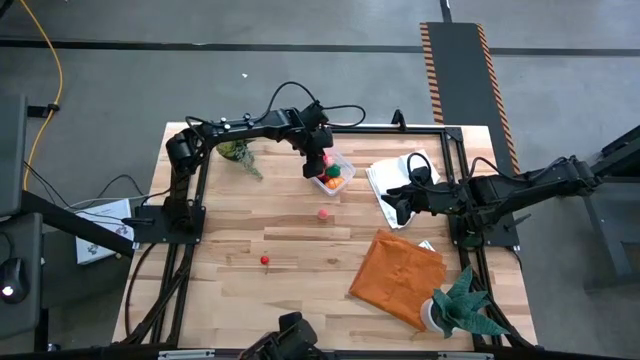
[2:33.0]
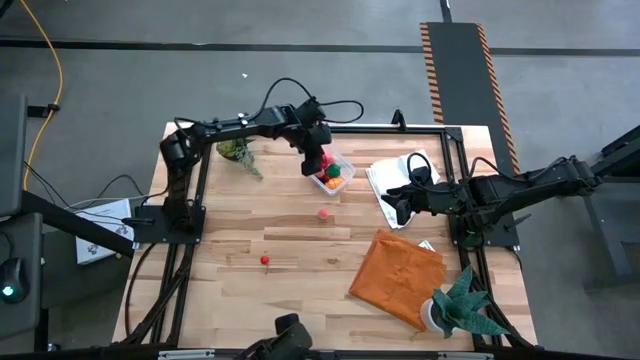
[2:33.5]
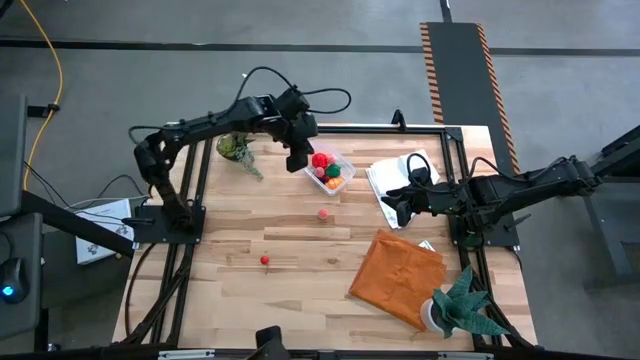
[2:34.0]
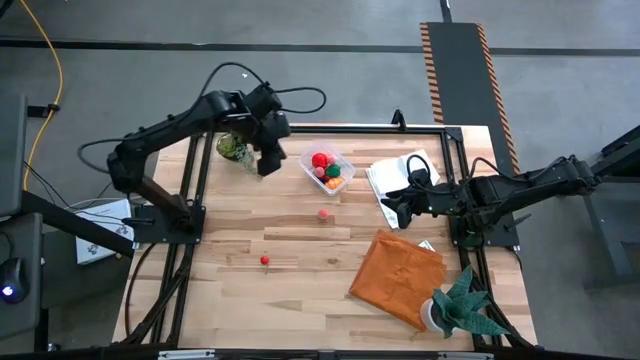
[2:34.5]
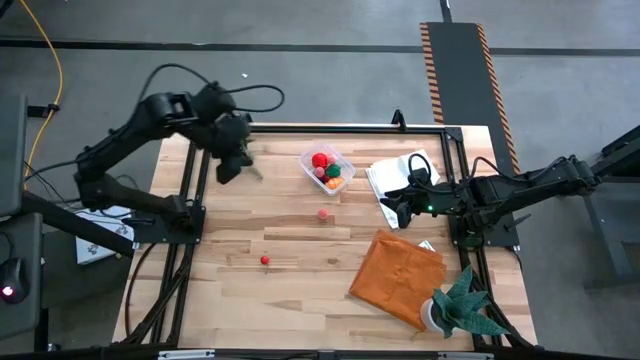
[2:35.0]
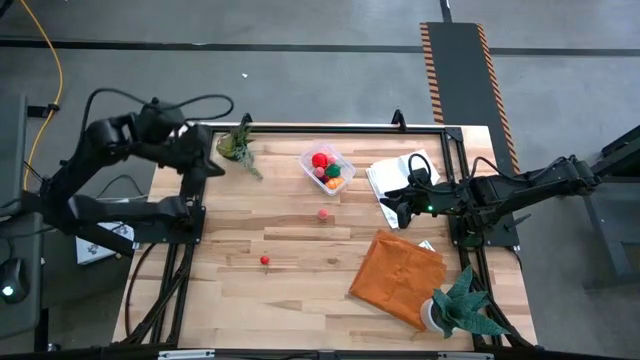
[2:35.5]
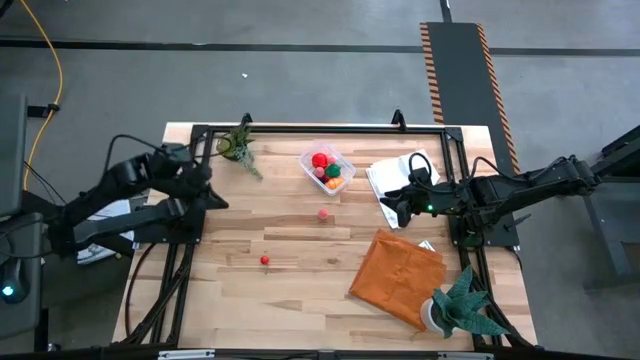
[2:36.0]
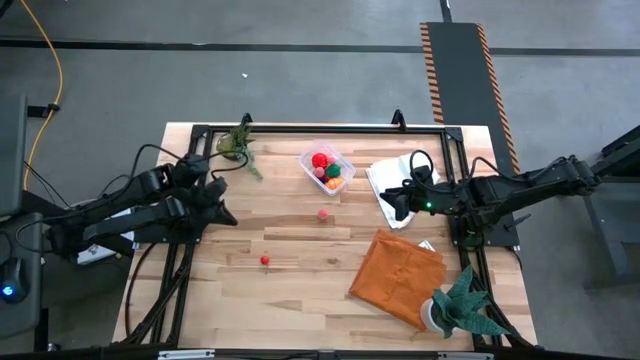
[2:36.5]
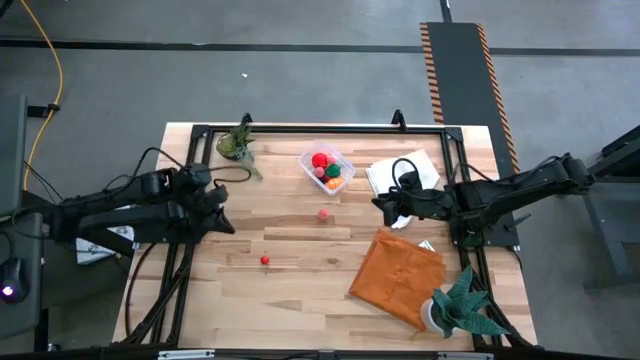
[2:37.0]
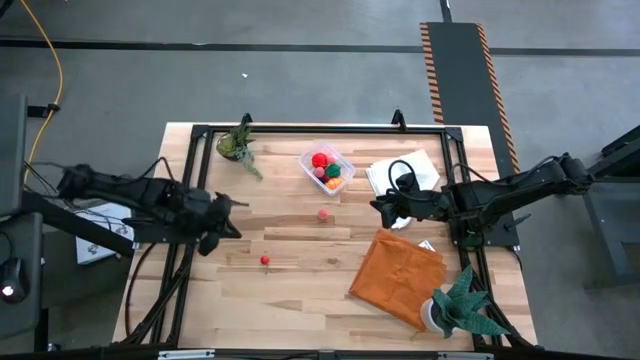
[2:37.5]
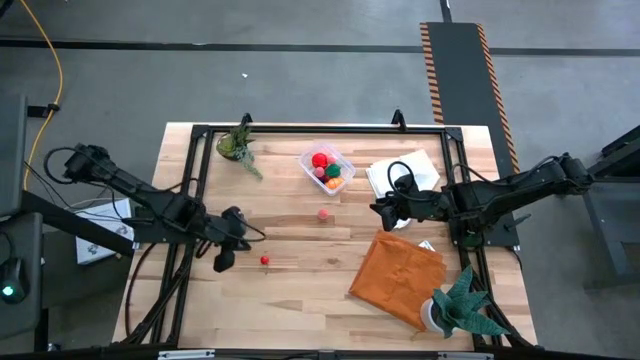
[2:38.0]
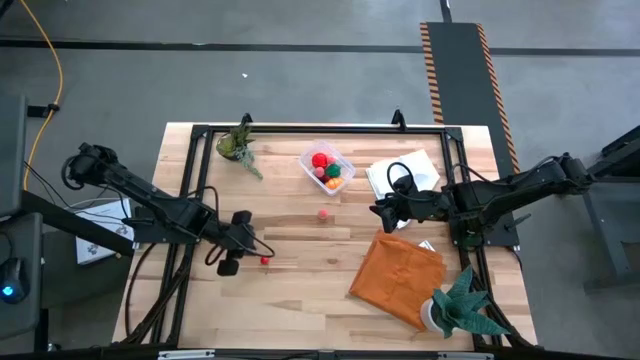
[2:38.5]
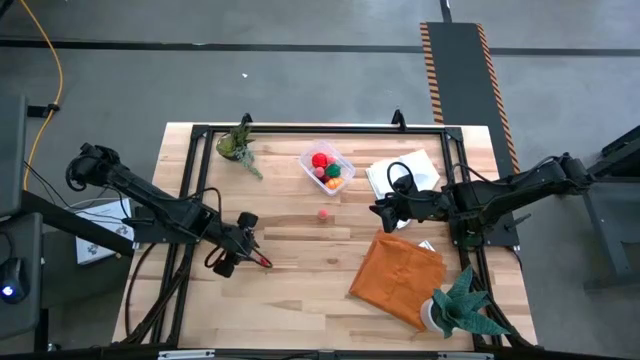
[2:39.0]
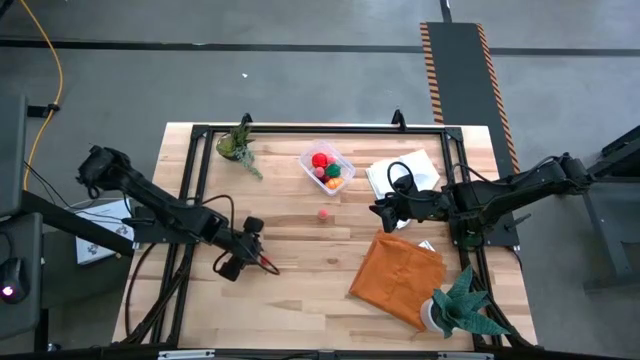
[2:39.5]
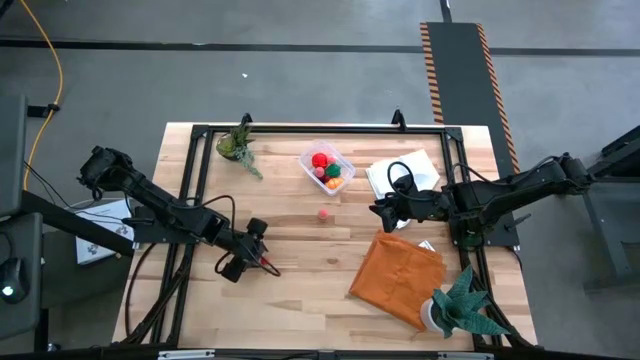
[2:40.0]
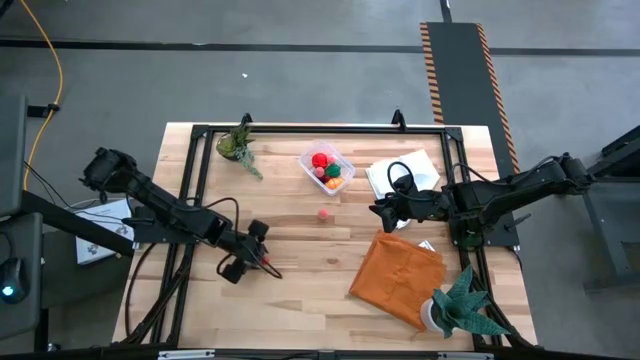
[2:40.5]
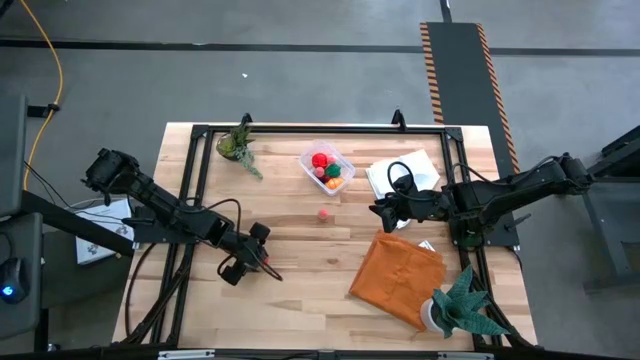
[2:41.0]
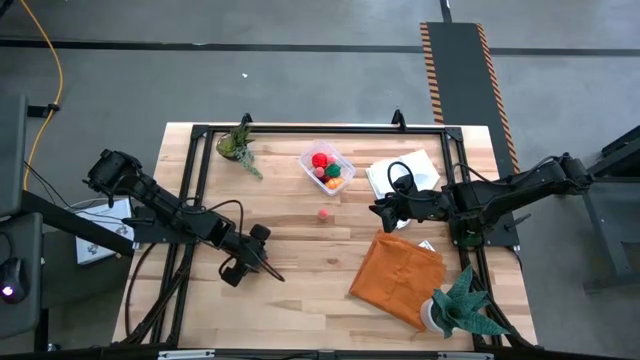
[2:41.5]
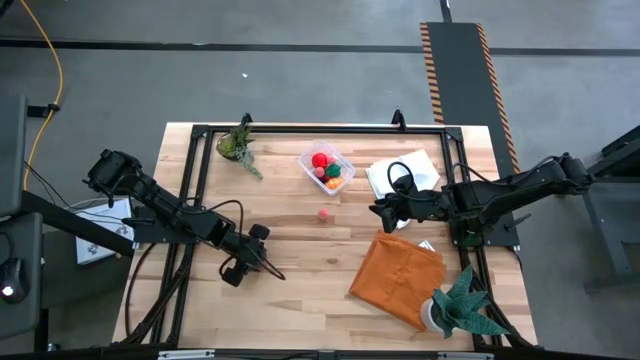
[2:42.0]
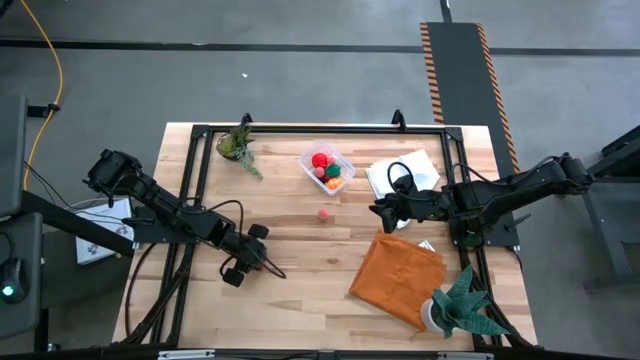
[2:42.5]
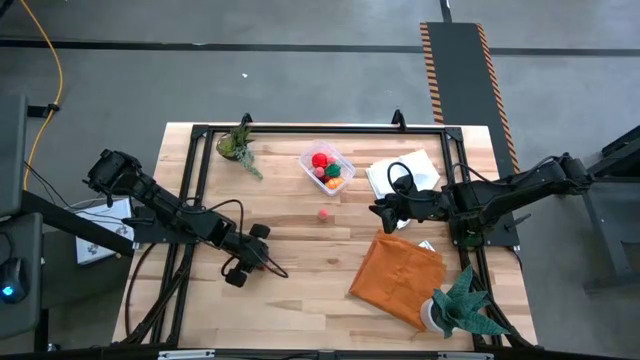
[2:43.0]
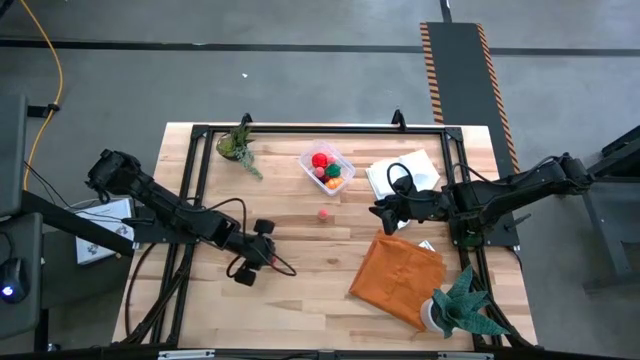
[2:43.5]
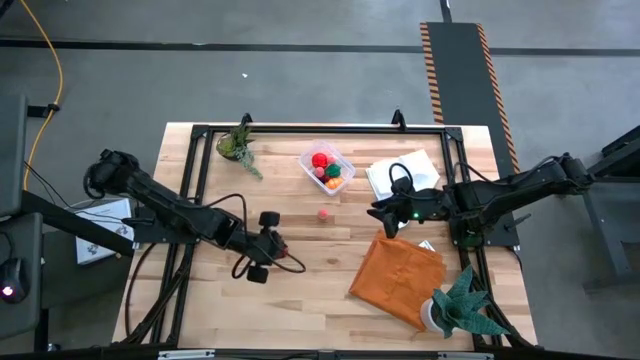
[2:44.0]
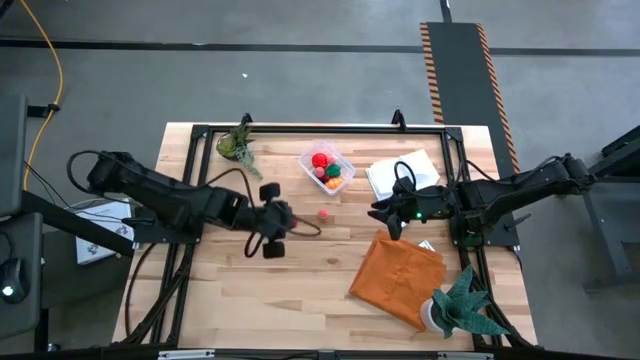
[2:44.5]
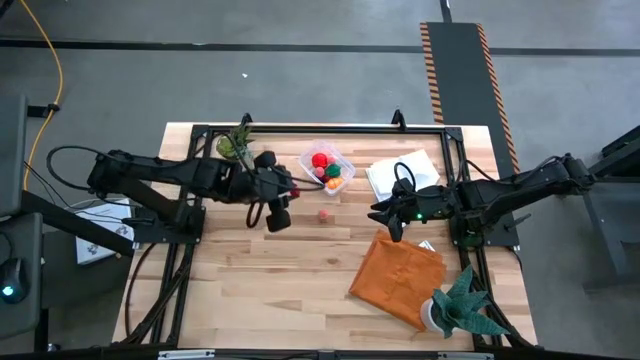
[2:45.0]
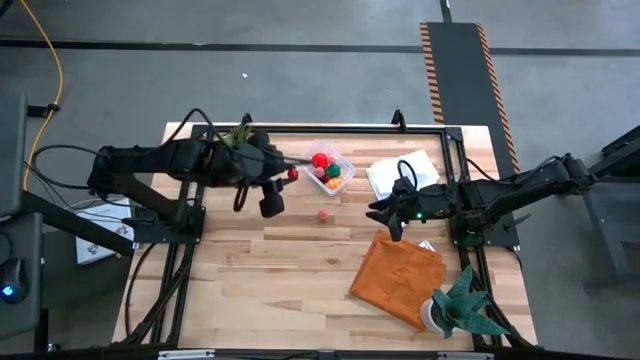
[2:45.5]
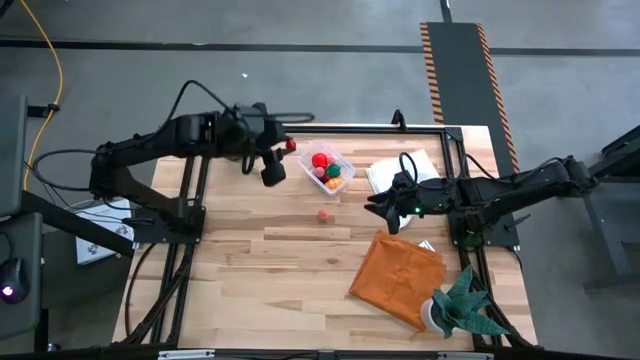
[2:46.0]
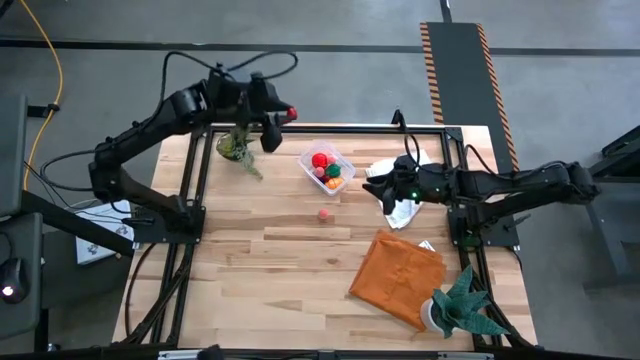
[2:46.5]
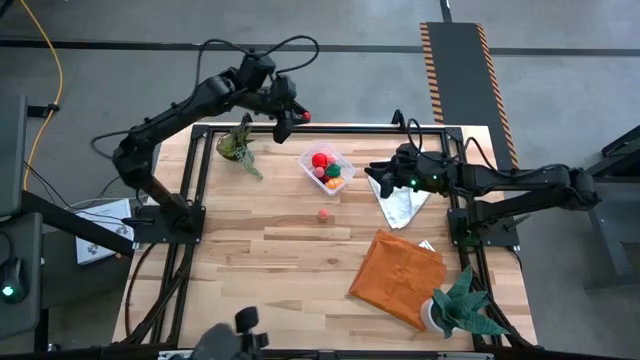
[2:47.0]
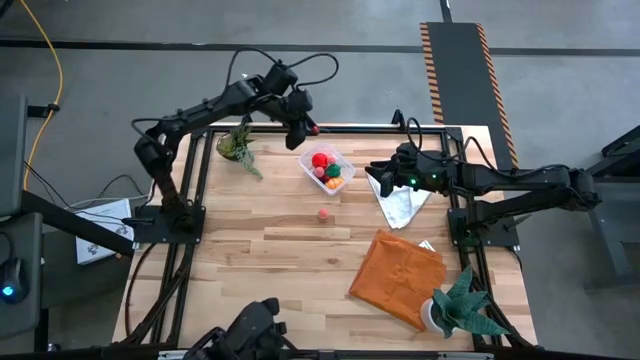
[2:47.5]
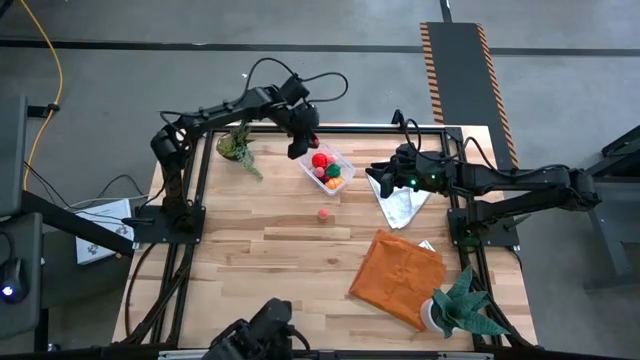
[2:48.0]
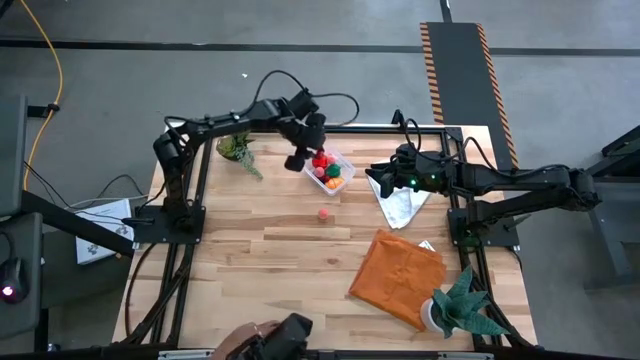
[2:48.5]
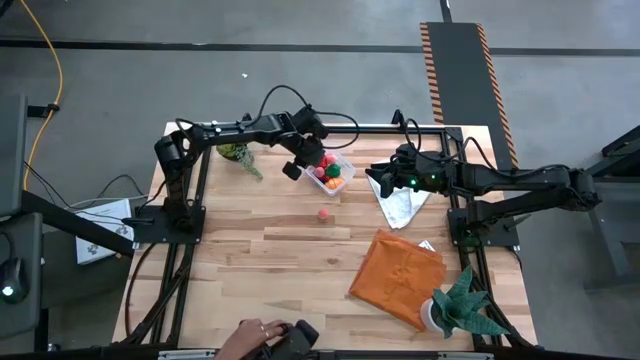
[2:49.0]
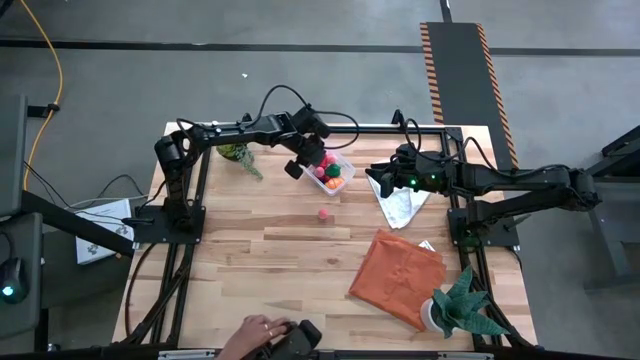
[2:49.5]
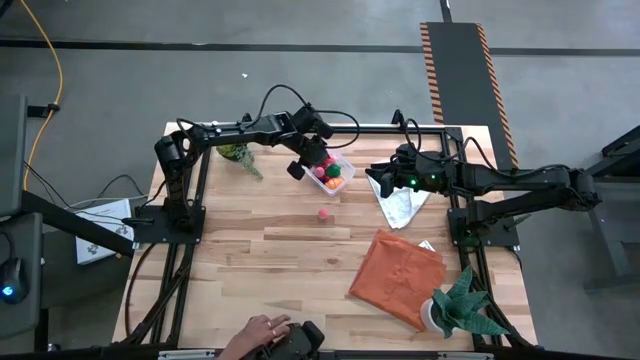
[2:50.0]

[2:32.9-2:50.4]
Task: Pick and placing Produce into tupperware
Put the red cherry into the transparent bin

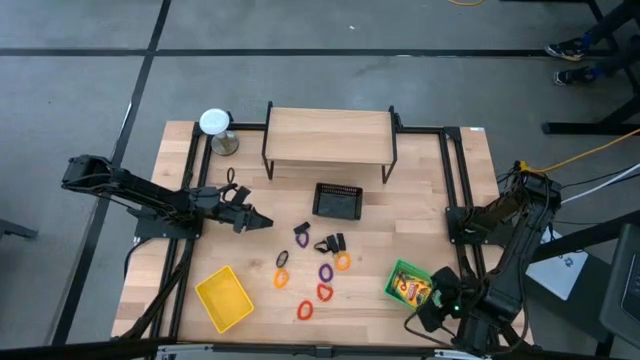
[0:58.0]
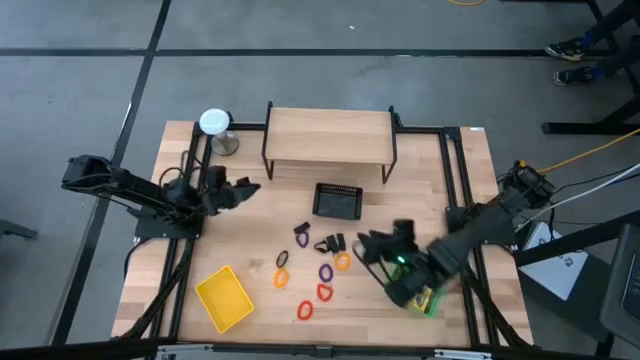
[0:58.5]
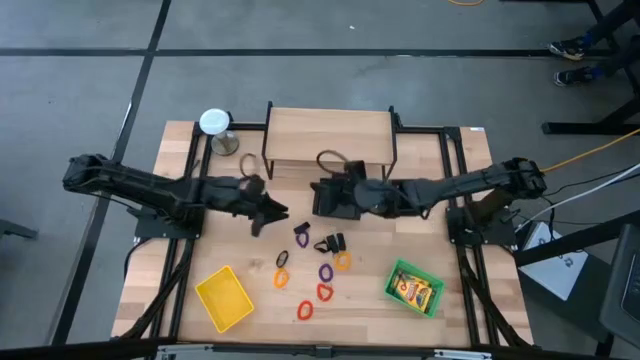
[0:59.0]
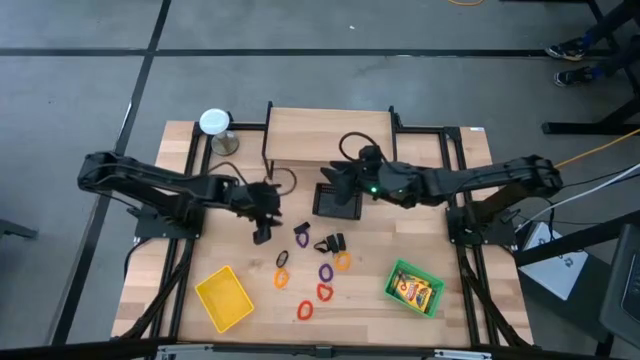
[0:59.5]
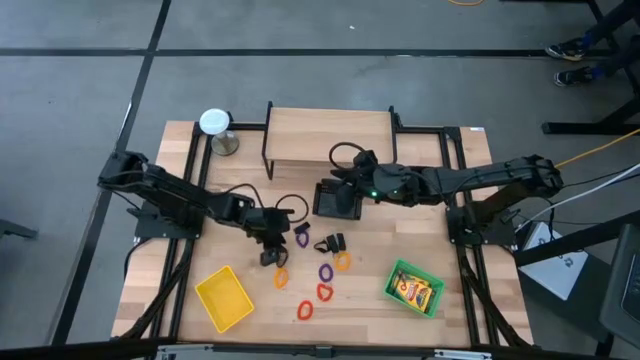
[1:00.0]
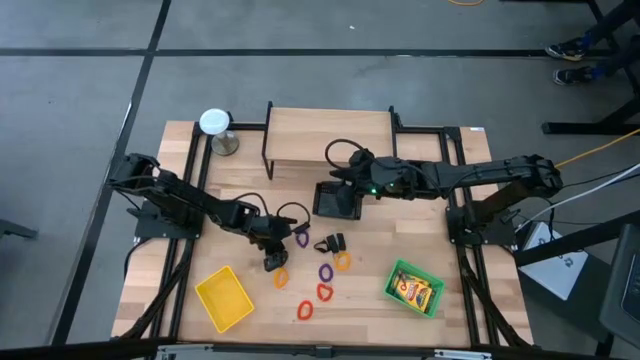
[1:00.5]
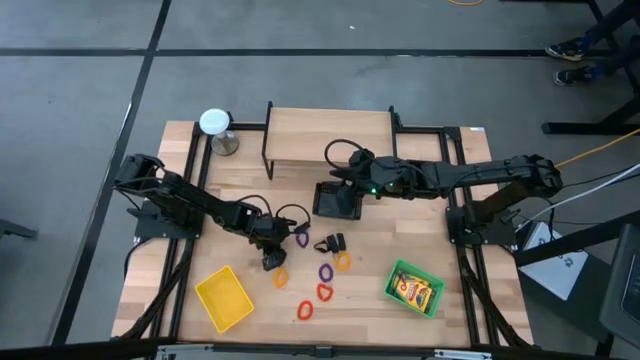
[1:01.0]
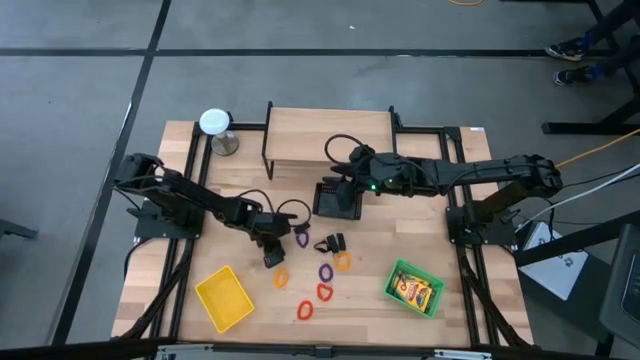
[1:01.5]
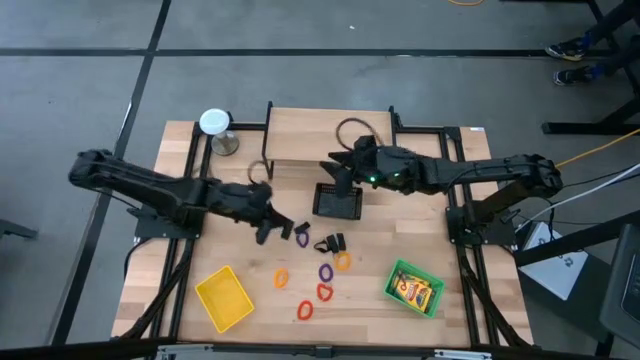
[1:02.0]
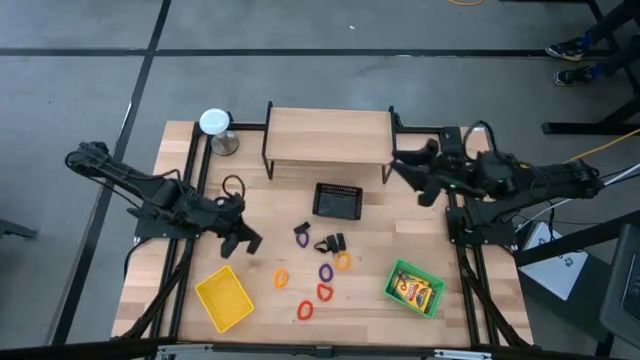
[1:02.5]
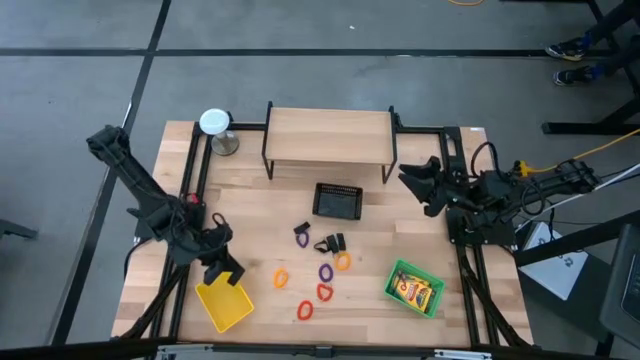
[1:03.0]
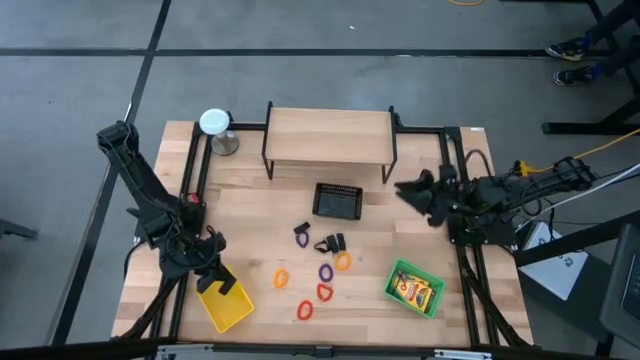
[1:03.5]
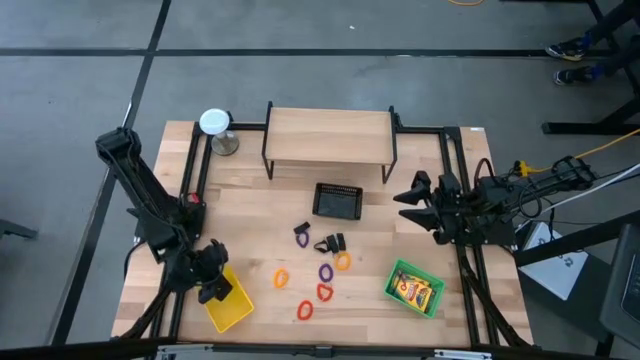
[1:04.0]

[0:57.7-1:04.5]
Task: Pick & Place Office Desk Supplies
Put the black rubber band into the yellow basket
